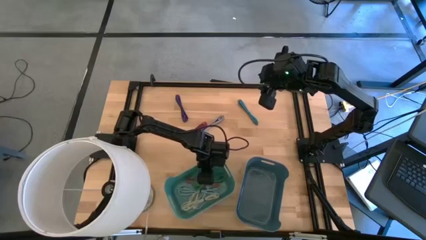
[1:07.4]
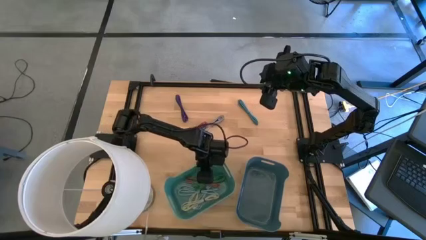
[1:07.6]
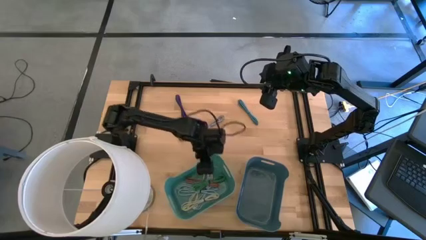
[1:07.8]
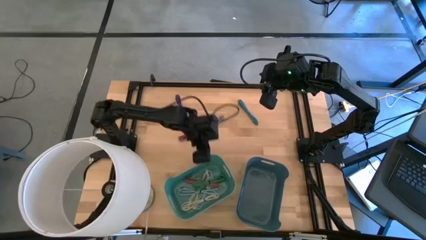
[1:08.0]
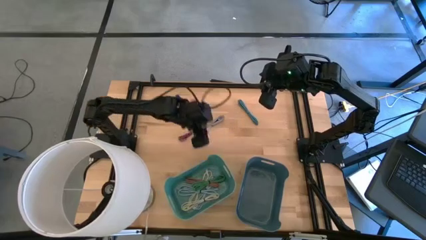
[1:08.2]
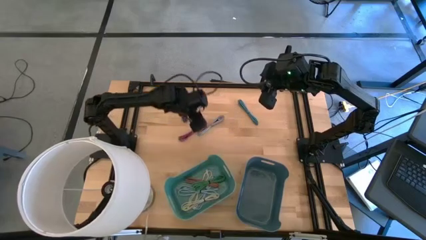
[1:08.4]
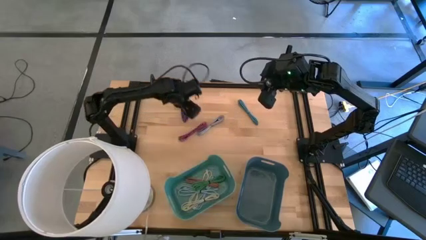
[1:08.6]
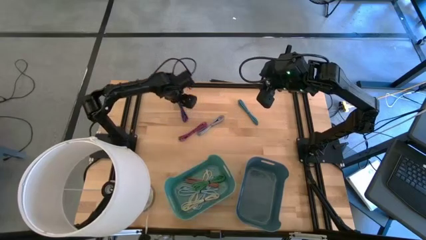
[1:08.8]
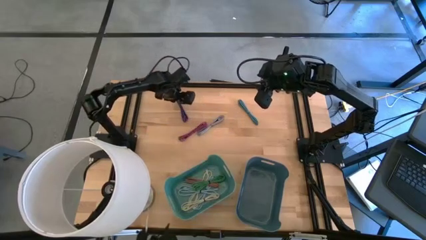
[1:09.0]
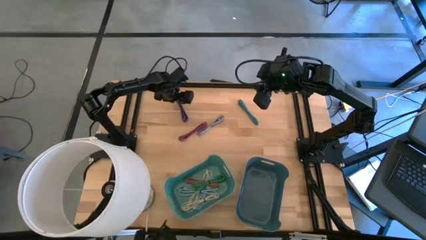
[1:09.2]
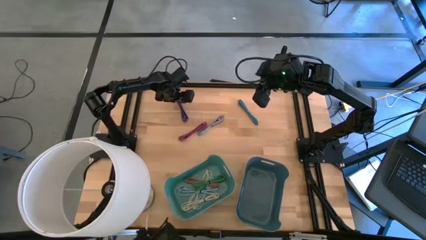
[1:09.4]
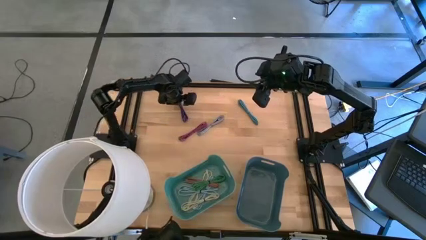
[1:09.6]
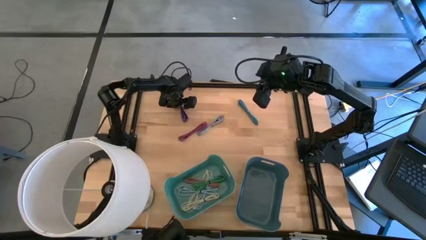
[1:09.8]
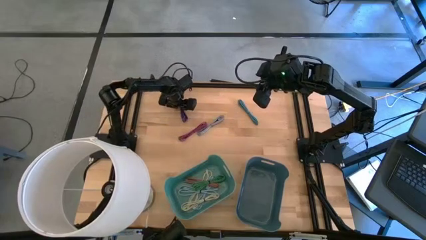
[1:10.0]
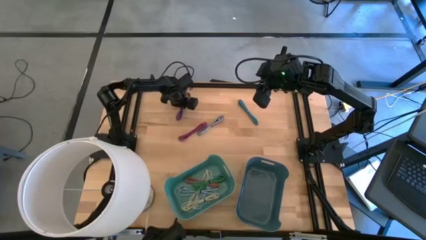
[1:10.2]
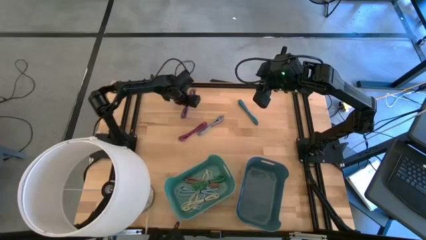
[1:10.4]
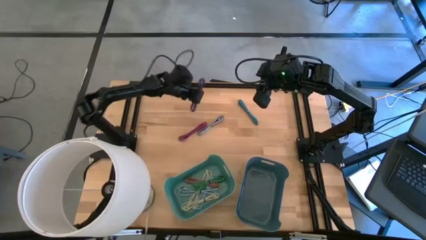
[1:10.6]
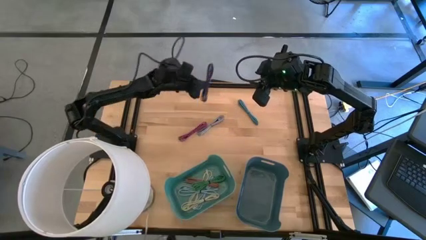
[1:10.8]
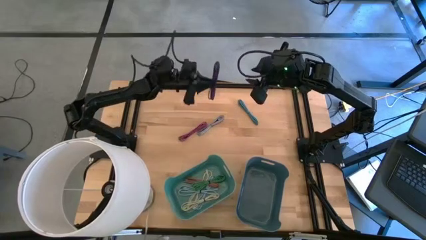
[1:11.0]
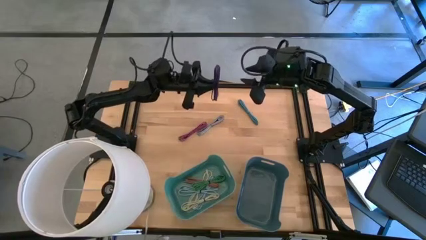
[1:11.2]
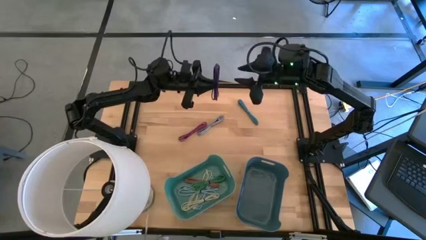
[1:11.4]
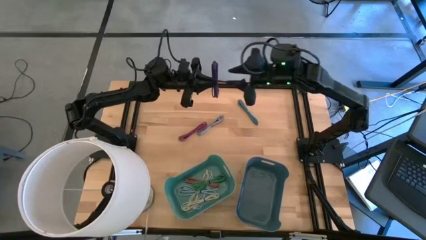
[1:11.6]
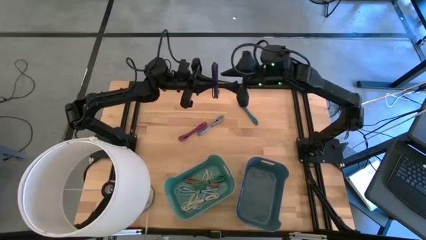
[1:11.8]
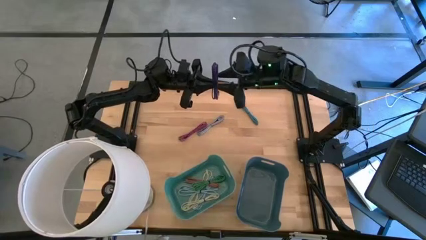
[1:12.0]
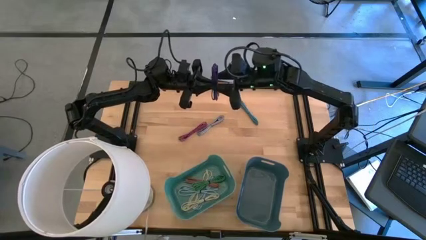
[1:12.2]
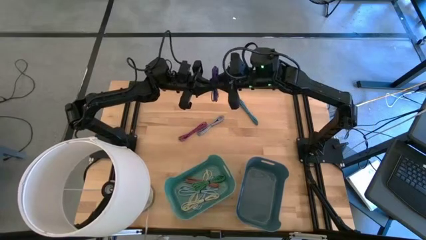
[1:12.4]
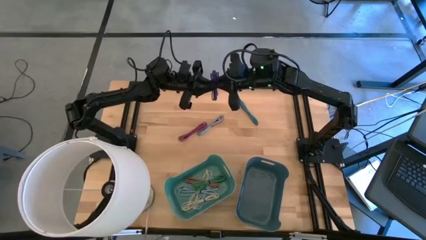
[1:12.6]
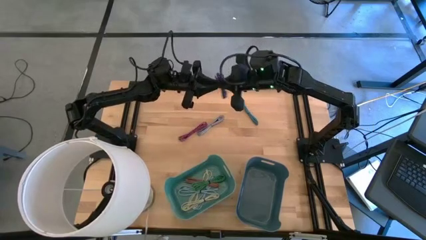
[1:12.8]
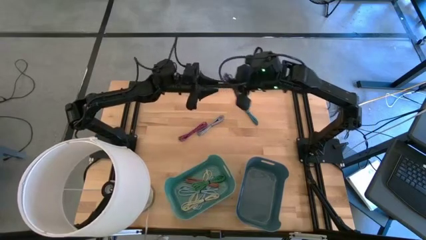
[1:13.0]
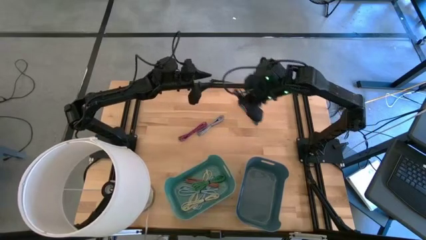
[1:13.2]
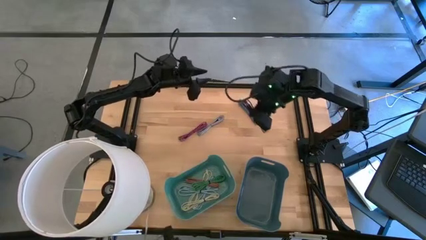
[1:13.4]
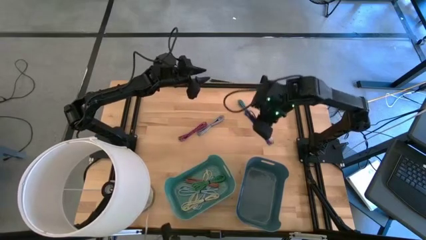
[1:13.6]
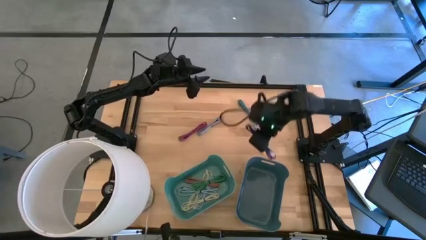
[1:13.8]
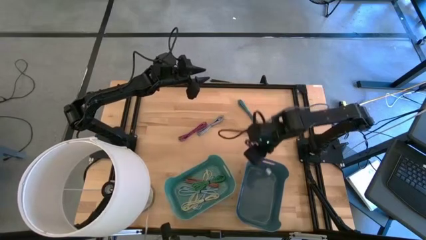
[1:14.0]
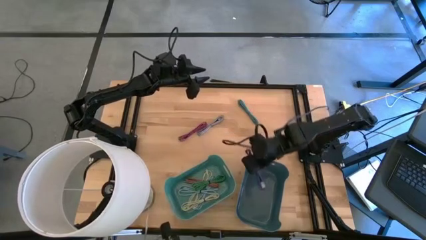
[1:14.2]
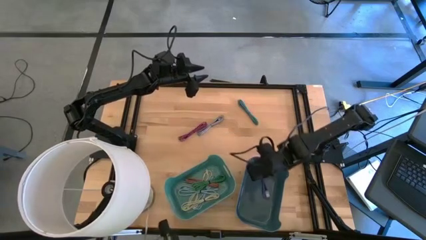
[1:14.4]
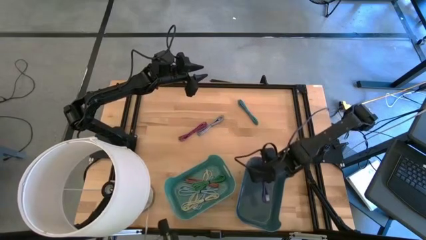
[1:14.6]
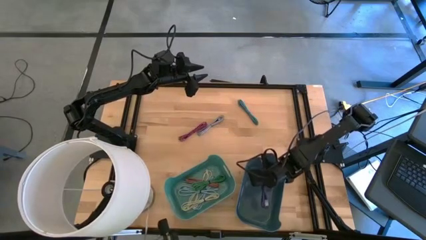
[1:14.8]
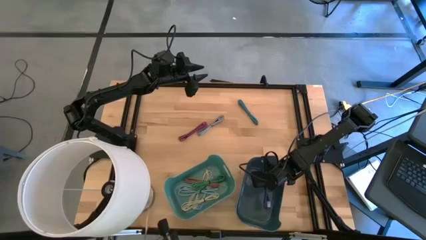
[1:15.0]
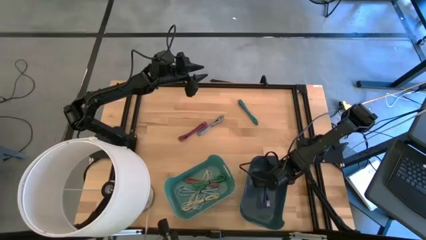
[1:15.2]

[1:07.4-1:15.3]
Put the violet patterned charger cable into the blue bin

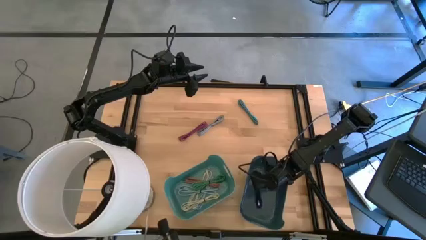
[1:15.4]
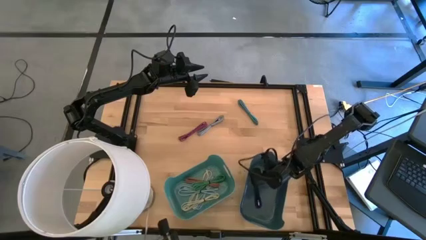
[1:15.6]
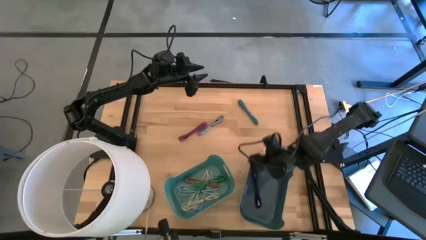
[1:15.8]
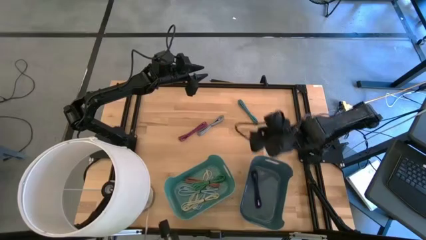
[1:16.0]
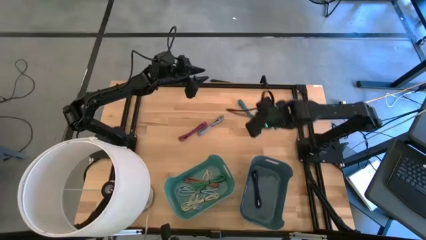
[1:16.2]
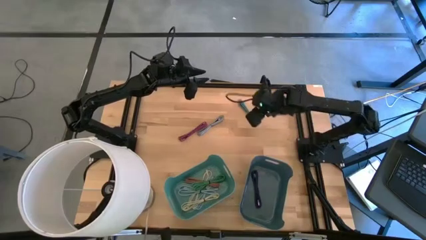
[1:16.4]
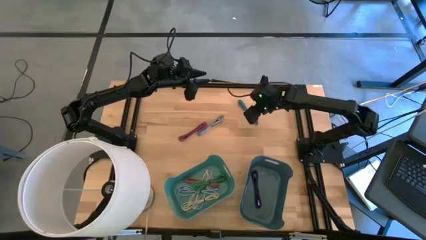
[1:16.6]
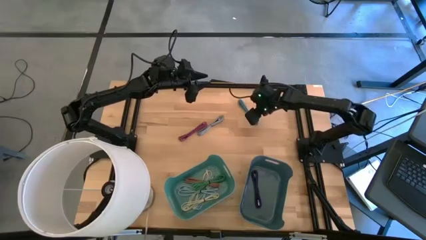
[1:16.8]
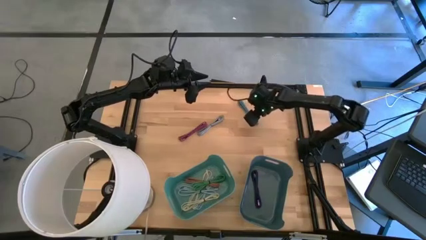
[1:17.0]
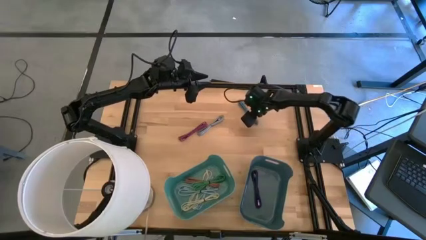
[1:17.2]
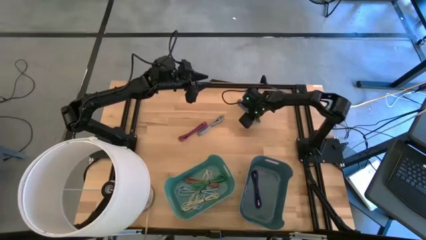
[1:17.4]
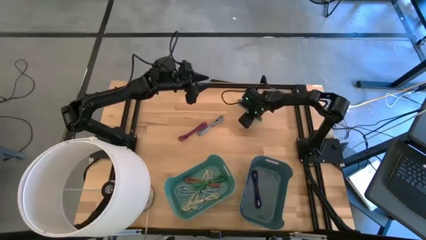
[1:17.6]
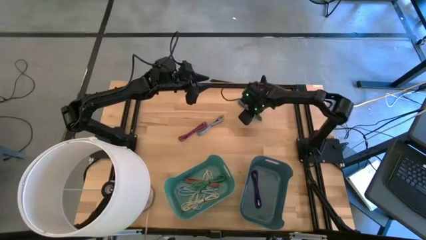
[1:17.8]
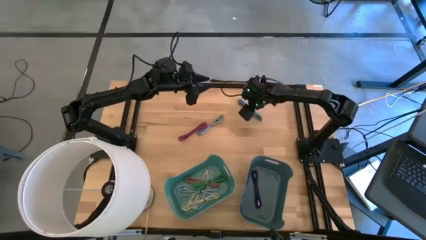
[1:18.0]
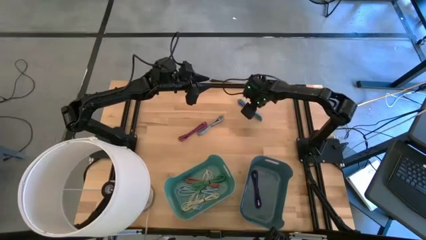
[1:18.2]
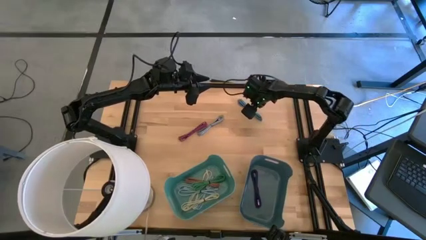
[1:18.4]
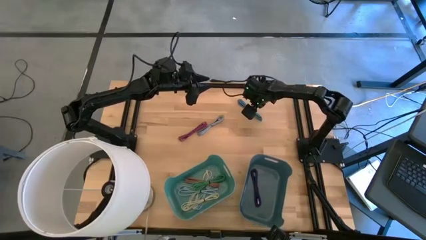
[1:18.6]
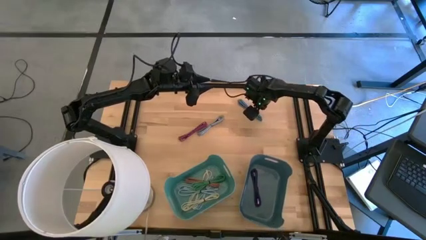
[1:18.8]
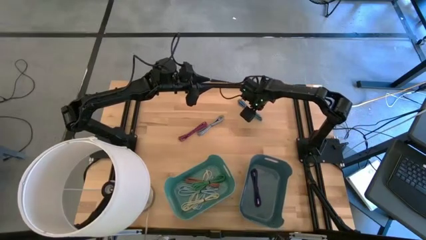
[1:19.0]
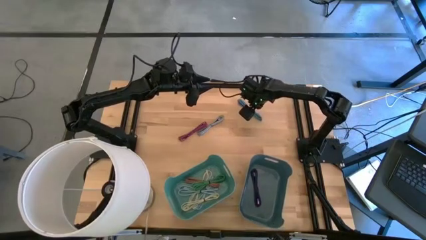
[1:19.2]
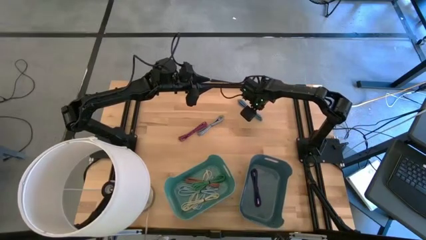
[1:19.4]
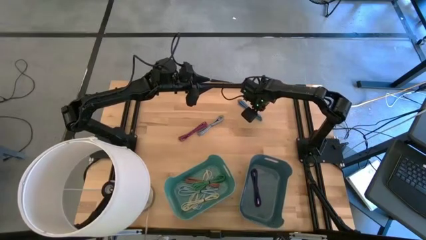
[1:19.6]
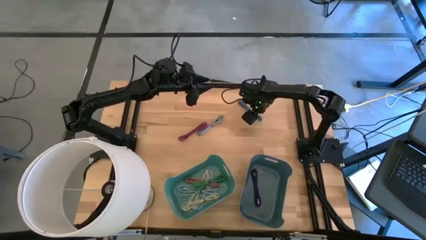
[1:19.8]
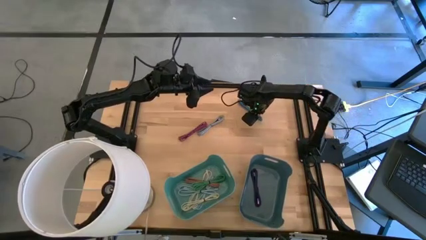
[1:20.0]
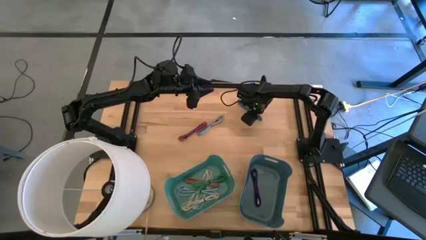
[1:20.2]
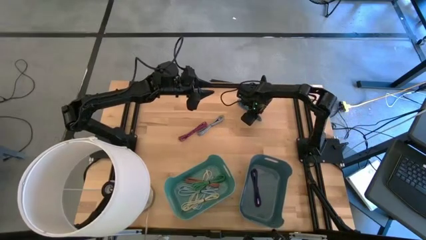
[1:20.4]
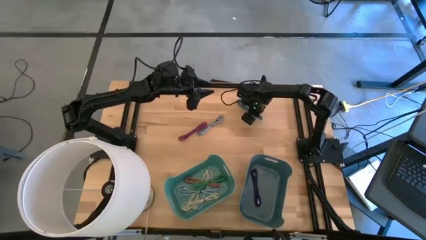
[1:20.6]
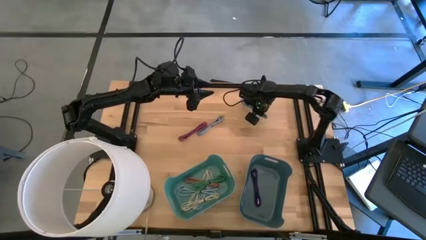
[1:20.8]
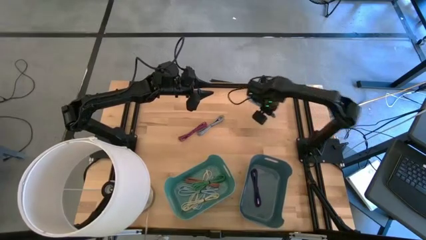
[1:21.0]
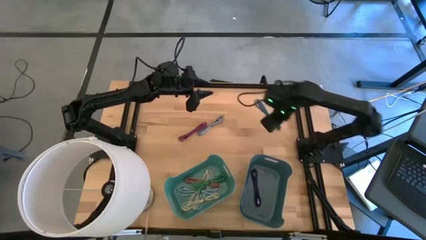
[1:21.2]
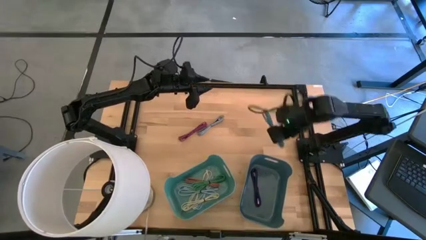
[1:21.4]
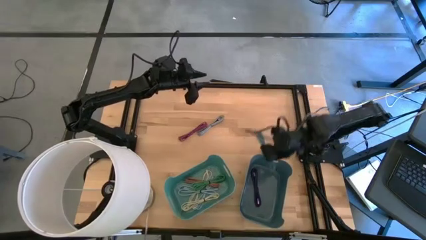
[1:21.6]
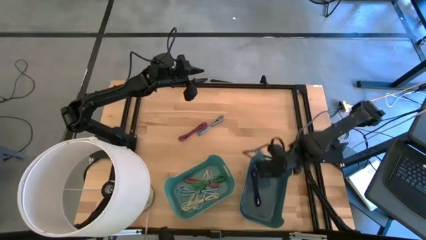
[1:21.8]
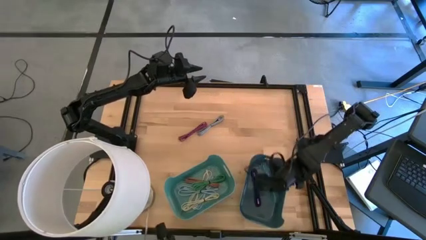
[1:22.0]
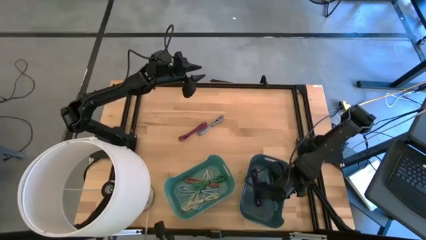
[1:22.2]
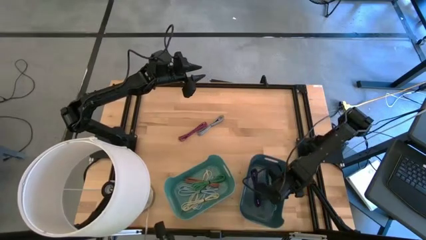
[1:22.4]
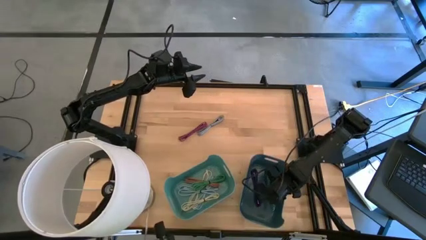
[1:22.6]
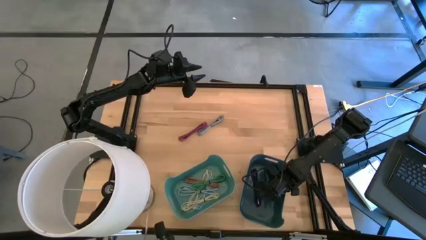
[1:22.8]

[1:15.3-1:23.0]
Put the blue patterned charger cable into the blue bin
